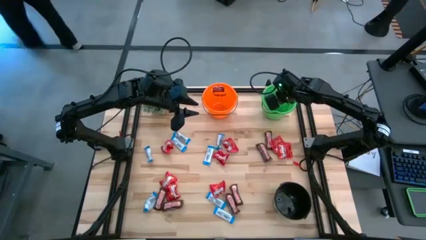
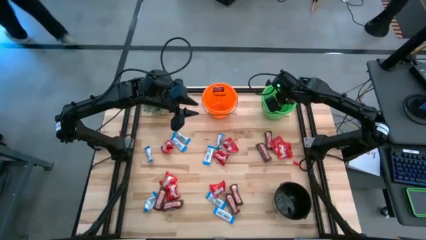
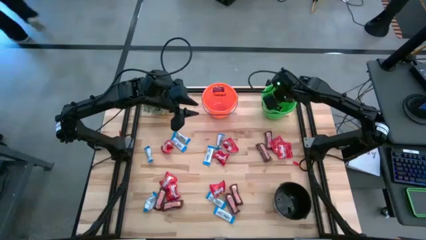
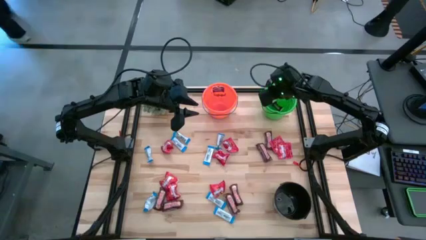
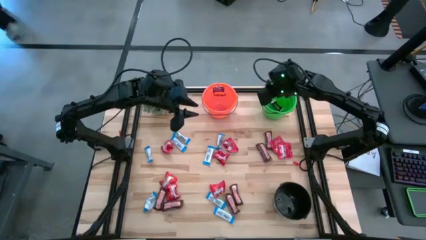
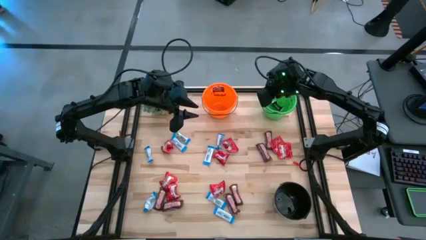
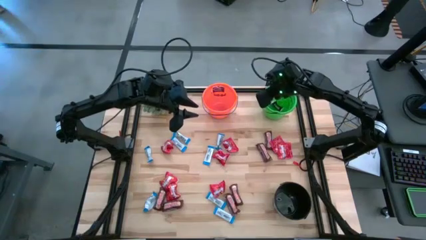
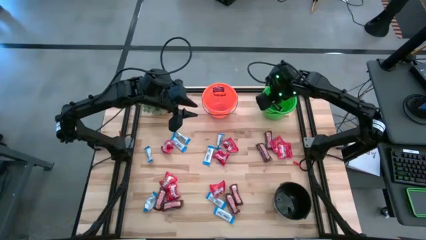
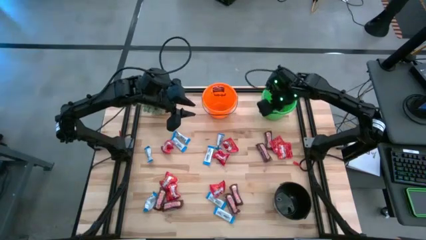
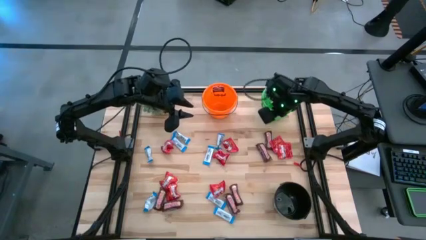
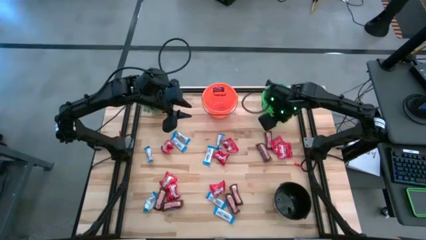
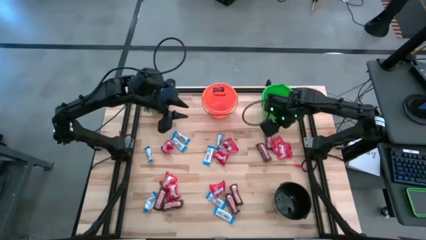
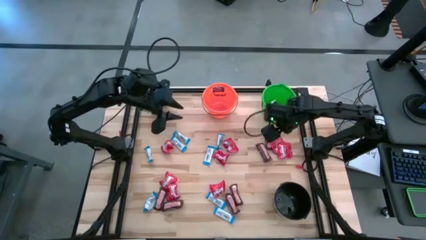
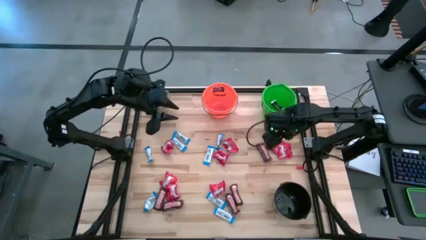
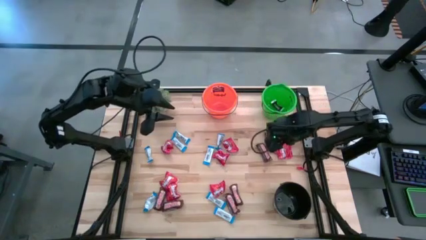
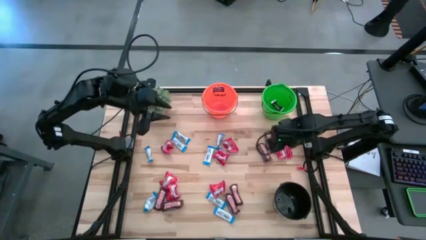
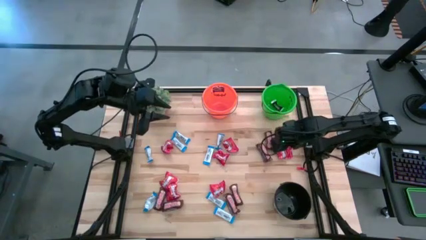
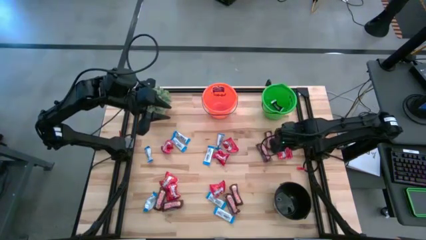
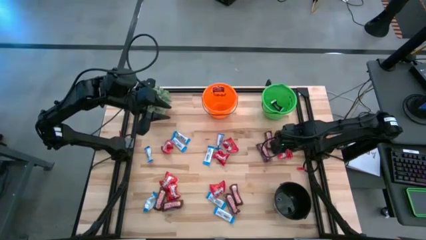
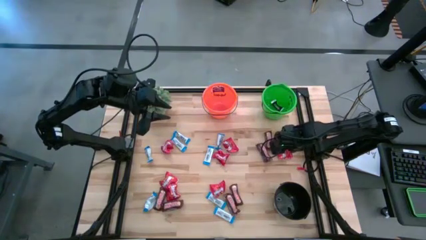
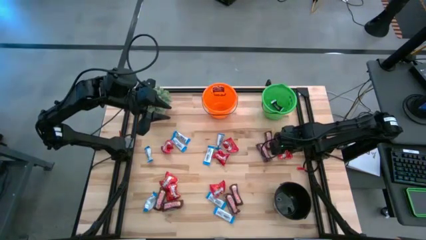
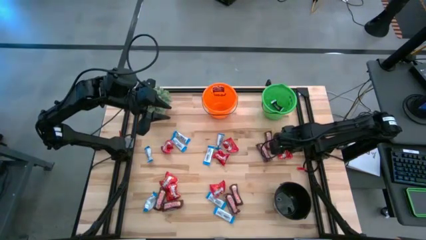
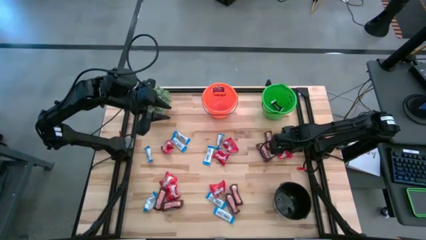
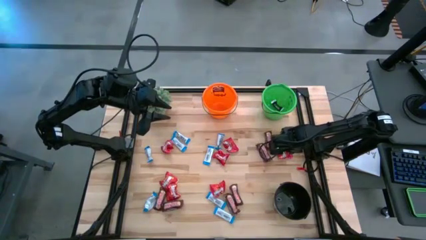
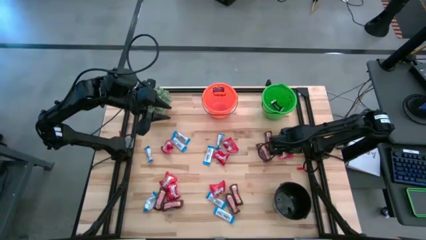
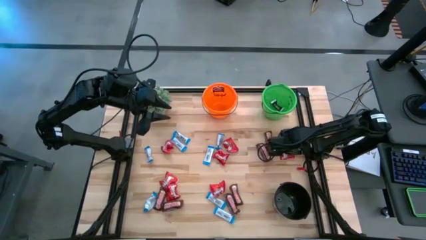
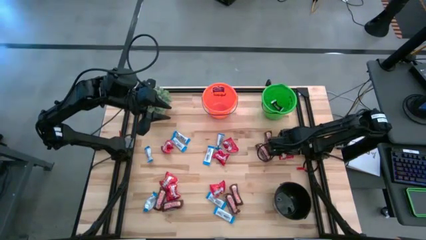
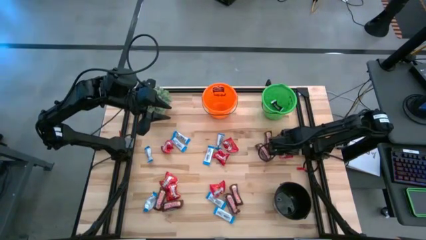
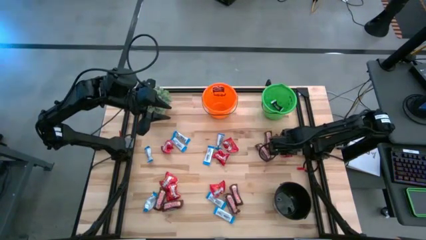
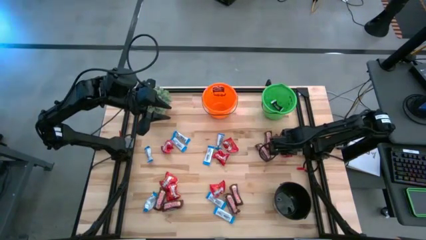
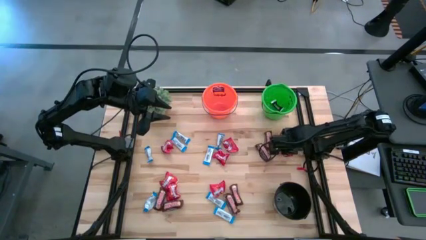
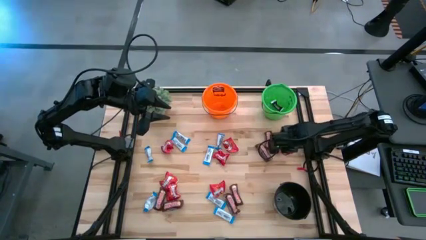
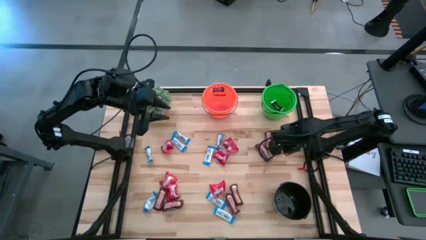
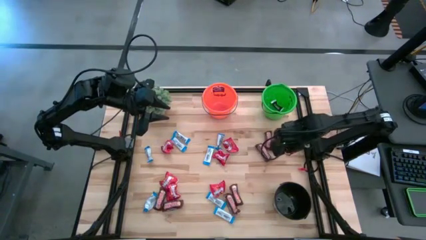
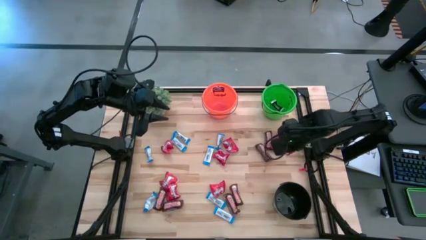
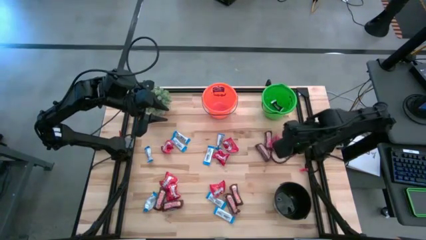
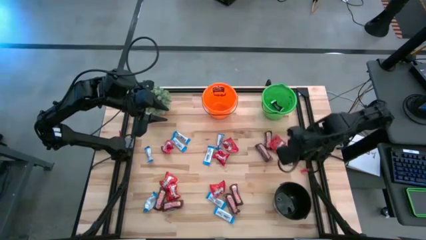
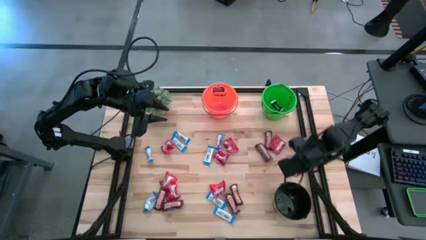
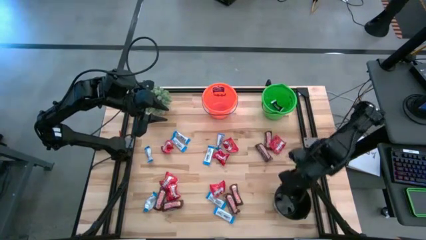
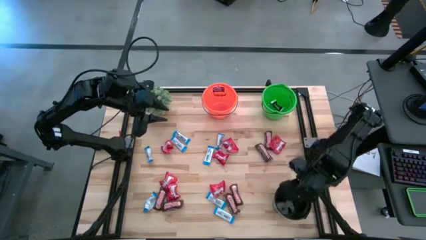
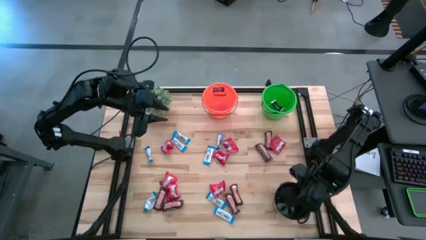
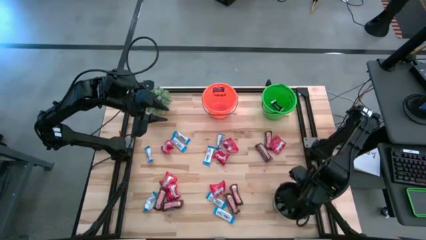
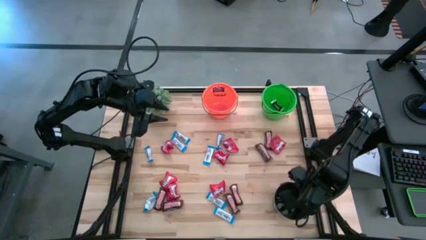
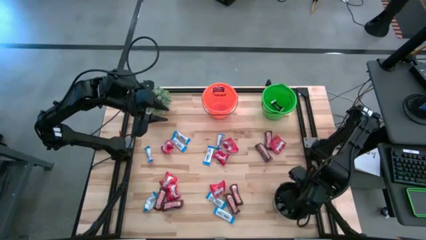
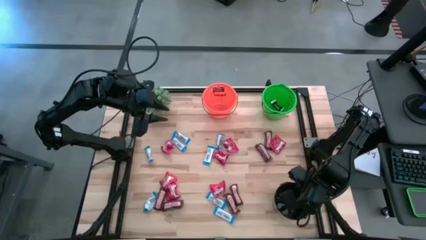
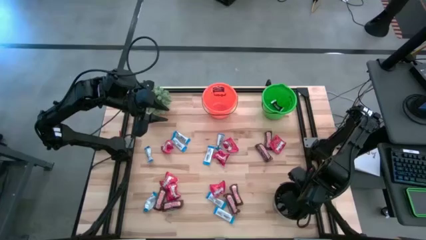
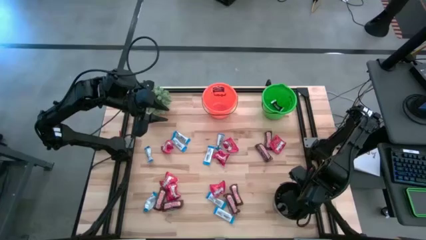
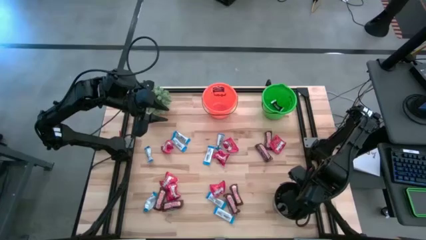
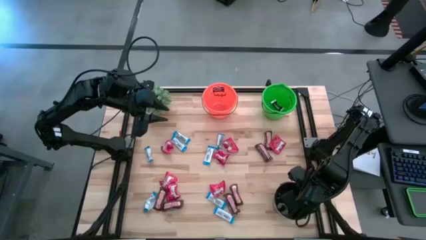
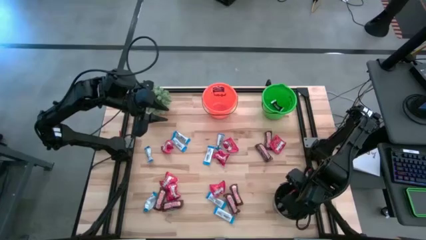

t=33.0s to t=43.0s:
Task: Organize candy in baskets
Put the red chocolate into the black bucket

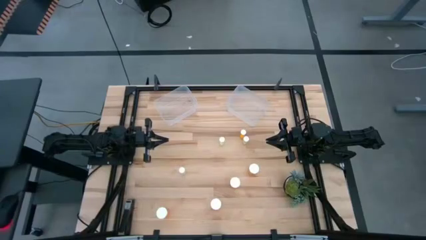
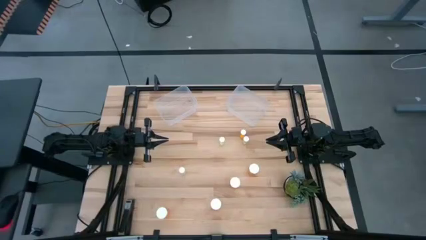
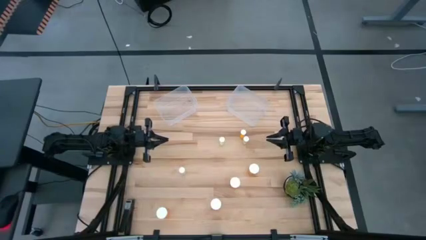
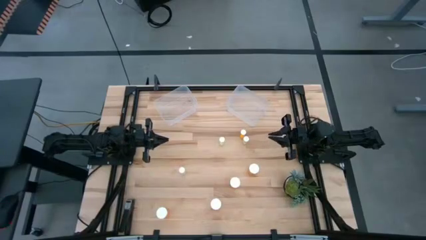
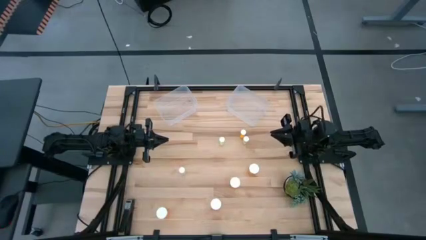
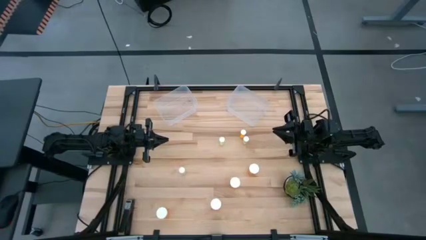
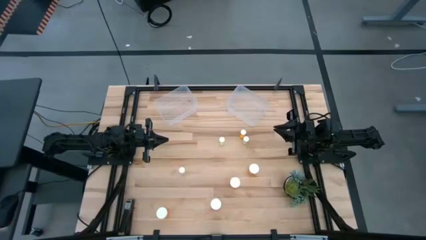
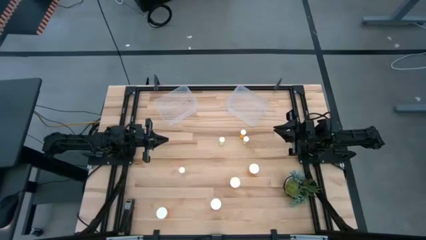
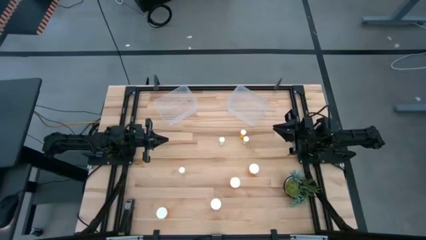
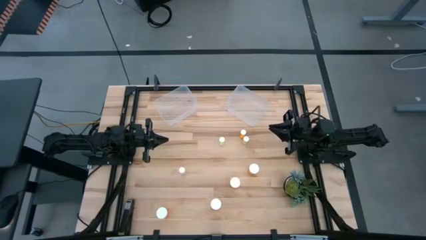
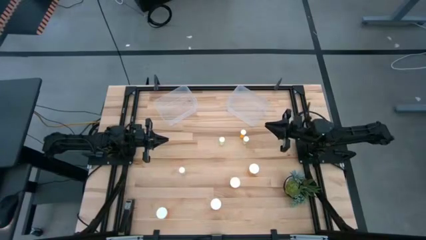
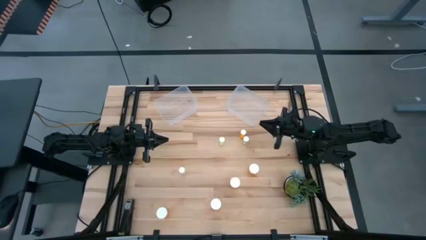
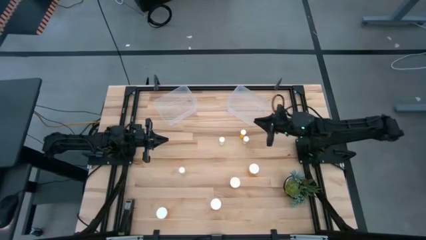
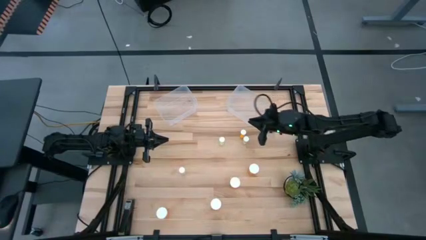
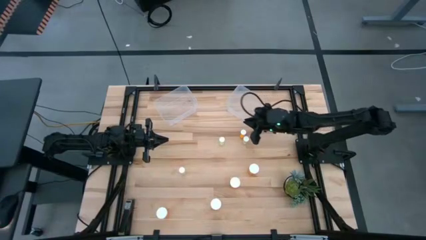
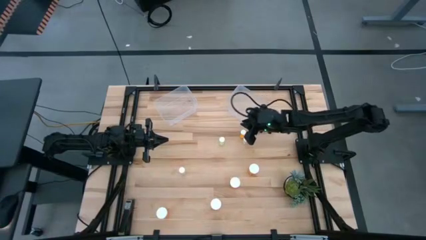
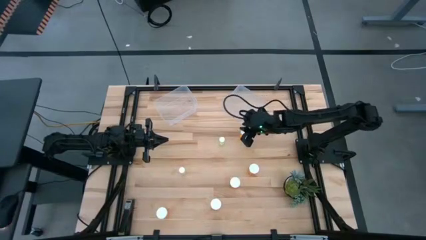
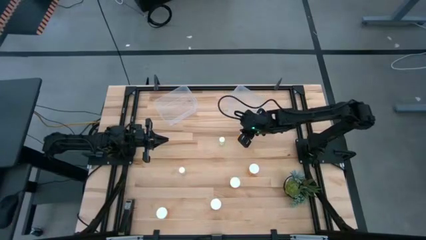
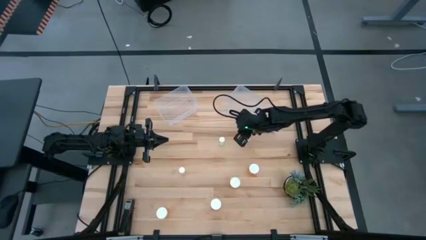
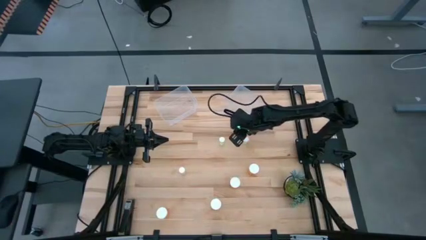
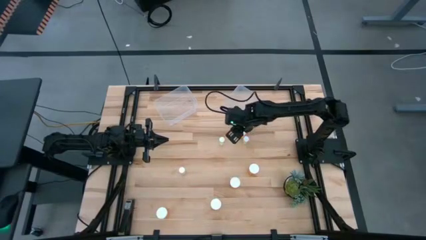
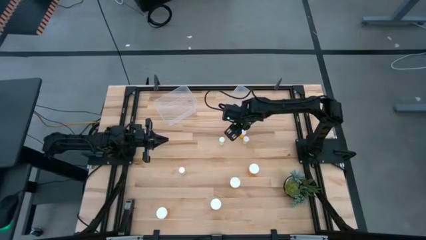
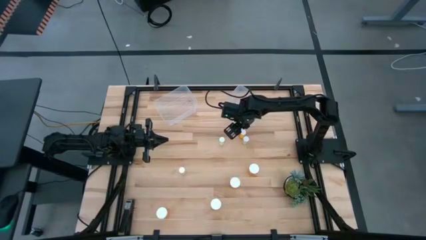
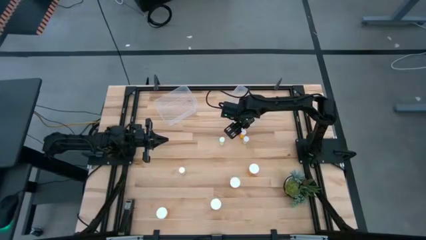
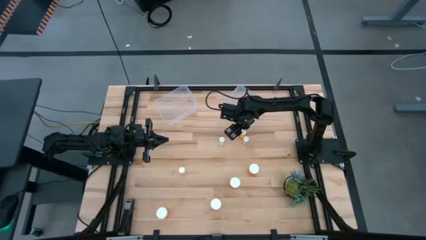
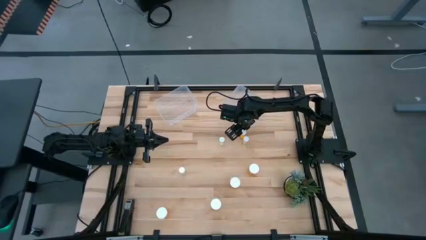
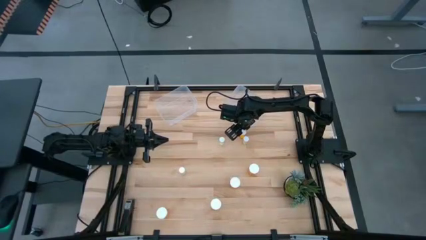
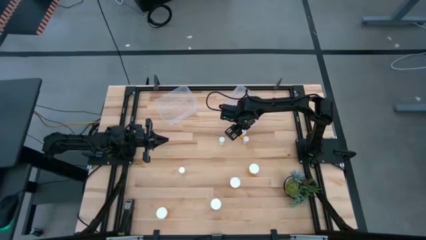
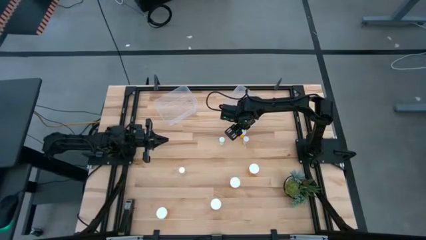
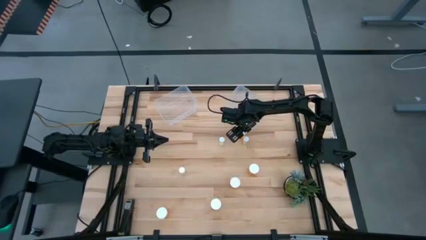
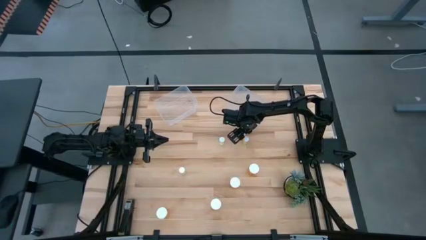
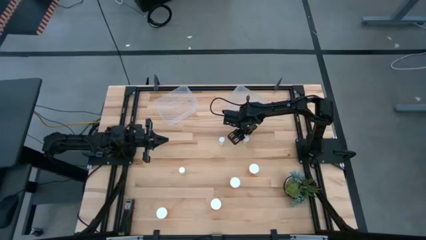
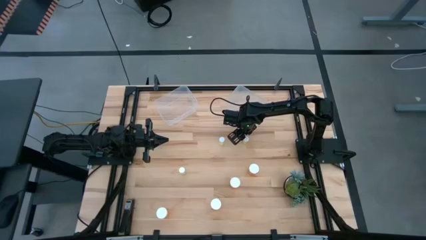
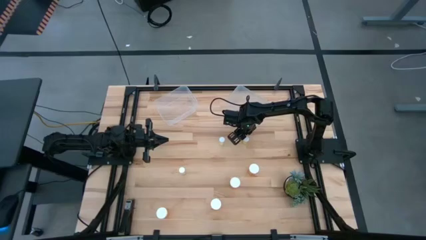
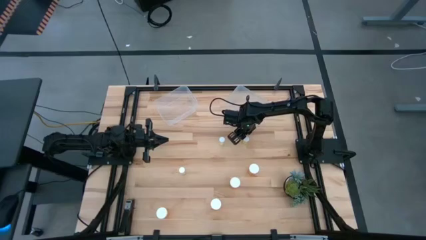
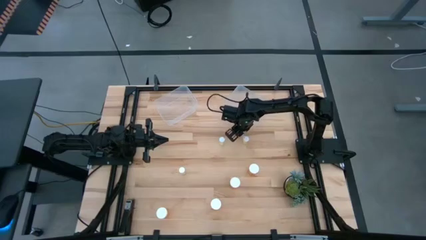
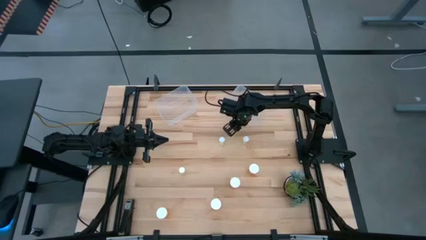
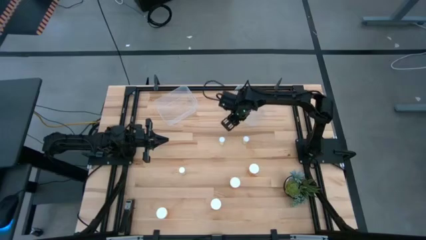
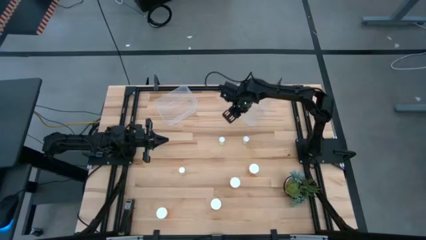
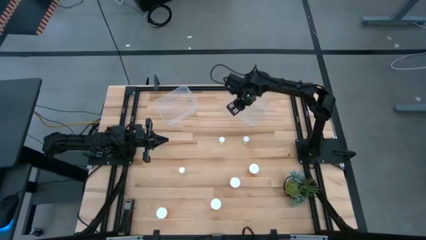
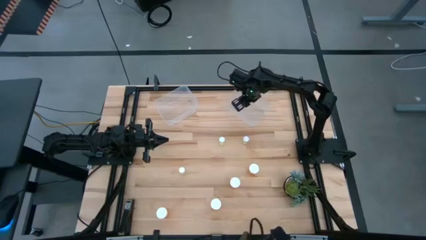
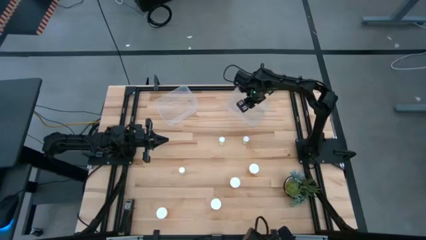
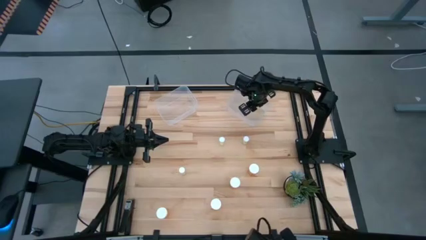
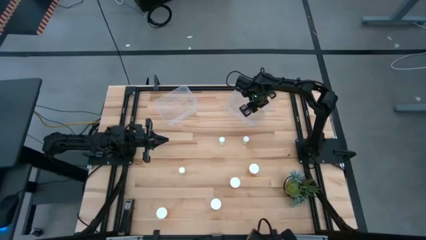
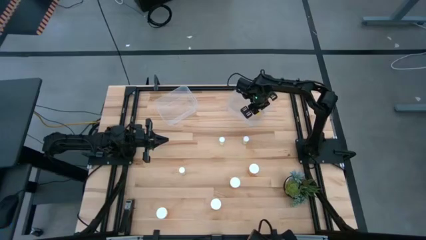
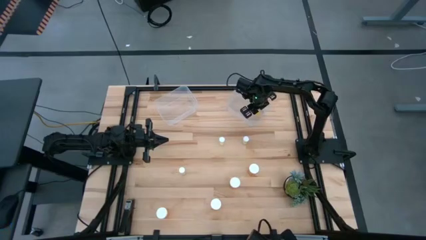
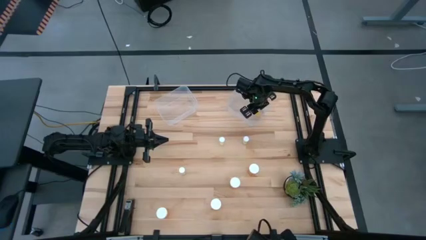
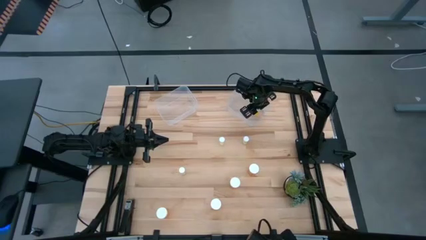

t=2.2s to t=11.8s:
Task: Pick and place medicine bottles into bin by pill shape (circle, oval)
Put the small orange pill bottle into the right transparent bin
